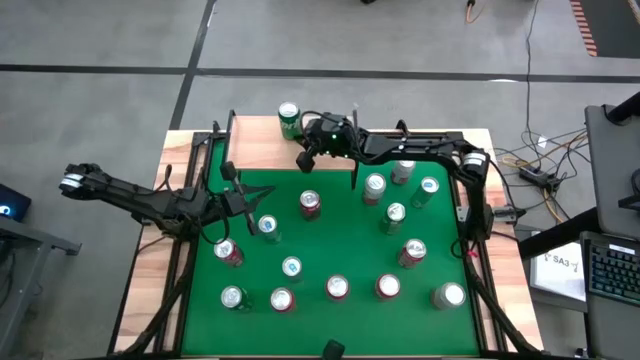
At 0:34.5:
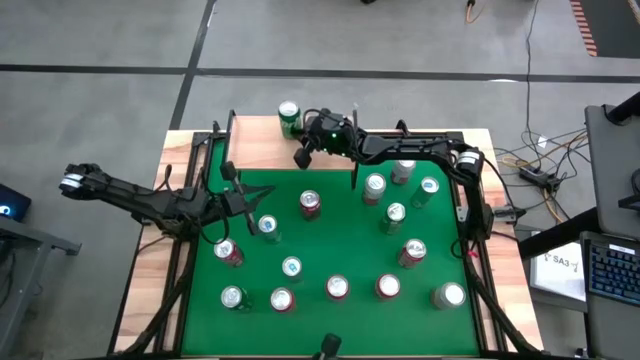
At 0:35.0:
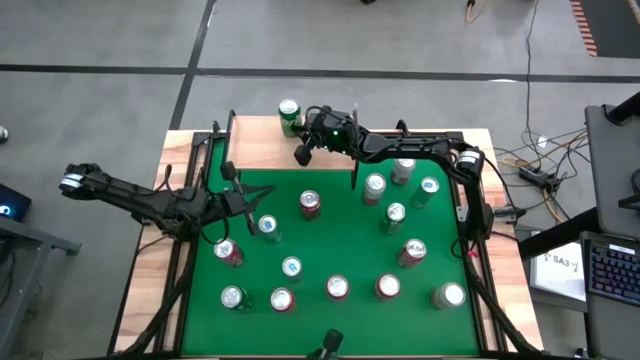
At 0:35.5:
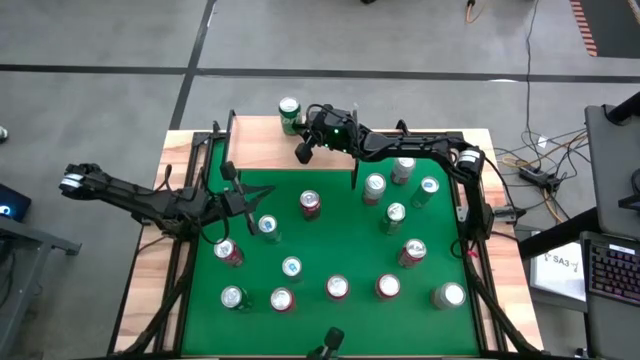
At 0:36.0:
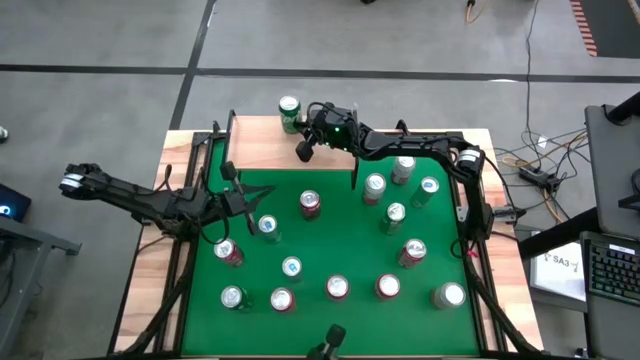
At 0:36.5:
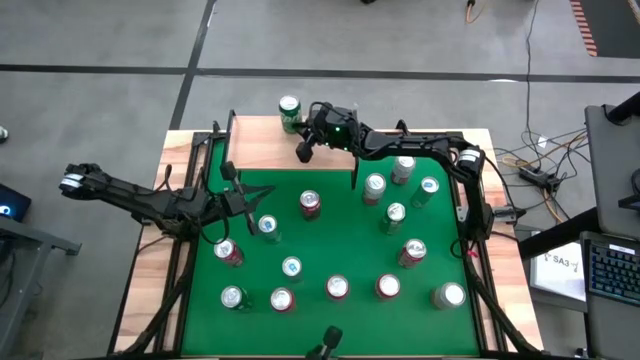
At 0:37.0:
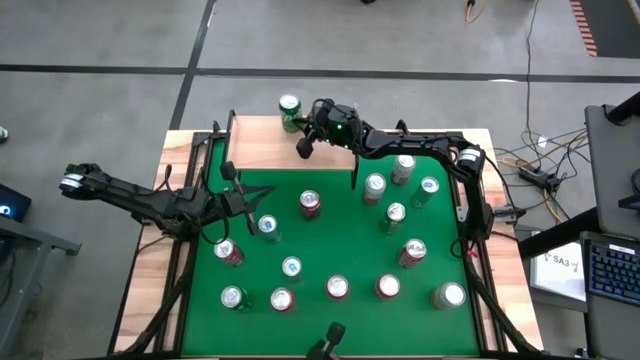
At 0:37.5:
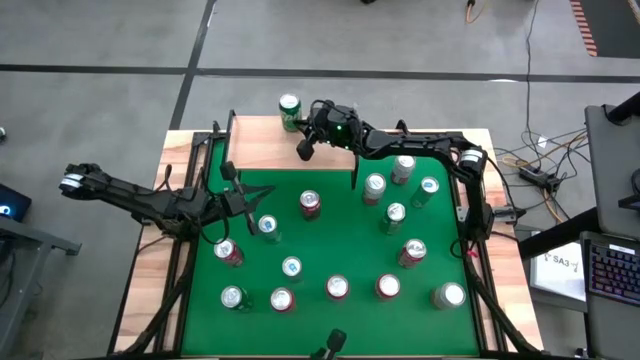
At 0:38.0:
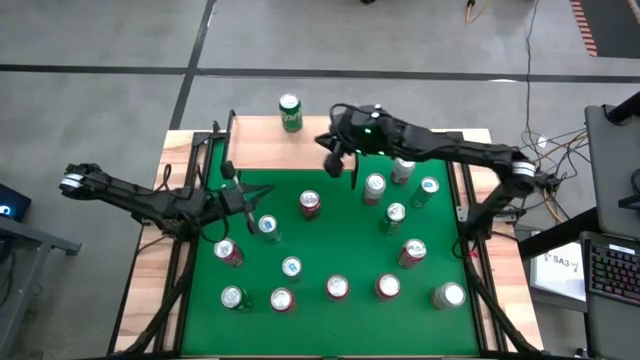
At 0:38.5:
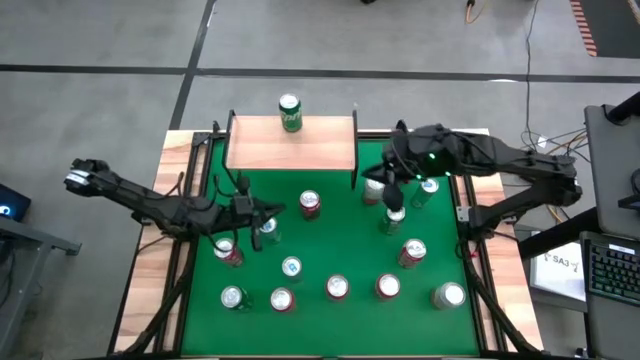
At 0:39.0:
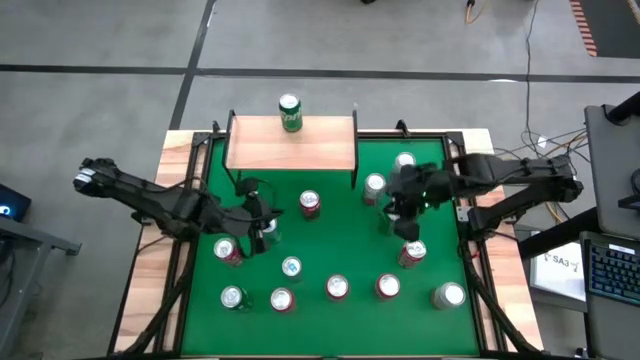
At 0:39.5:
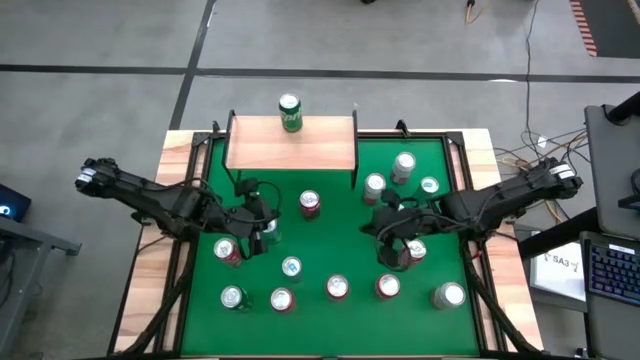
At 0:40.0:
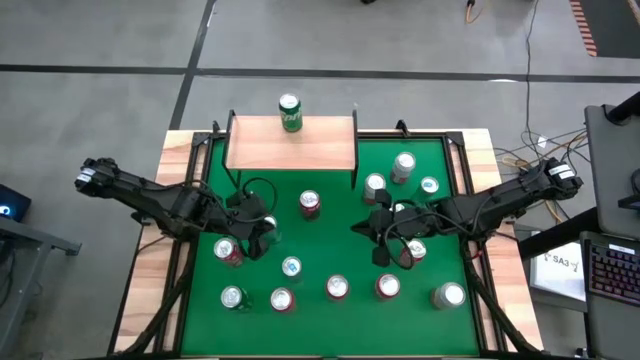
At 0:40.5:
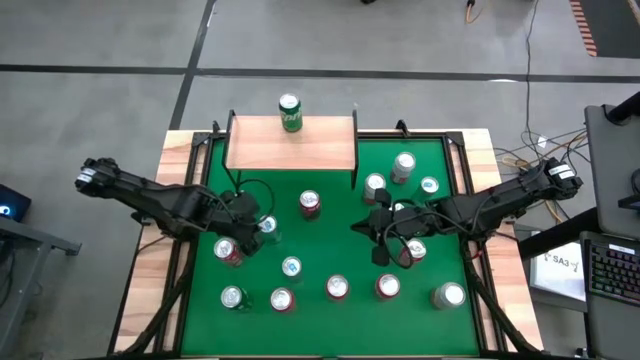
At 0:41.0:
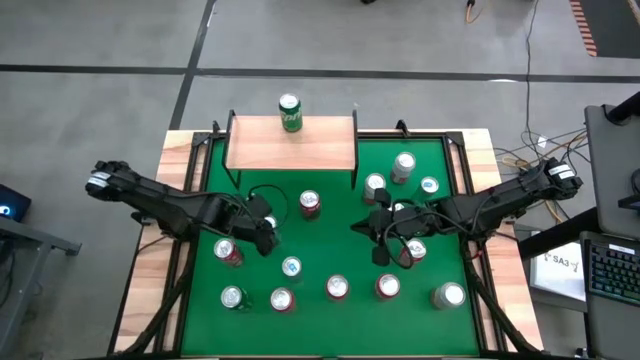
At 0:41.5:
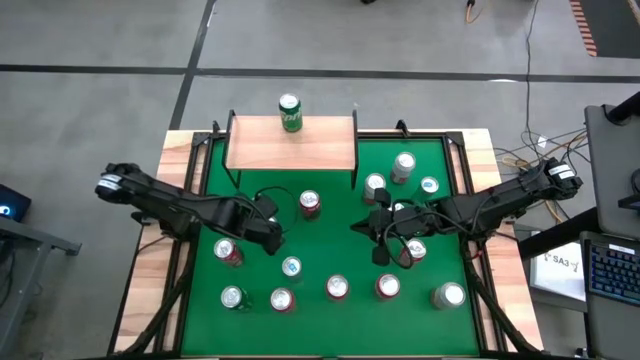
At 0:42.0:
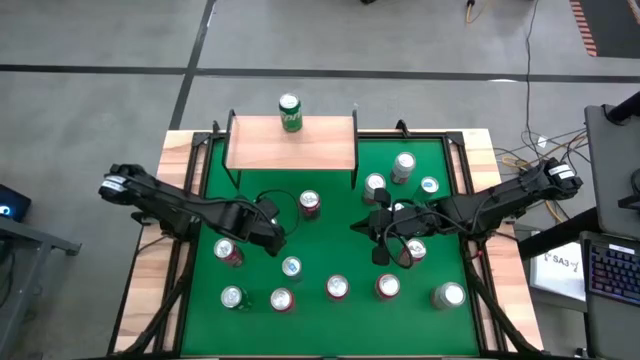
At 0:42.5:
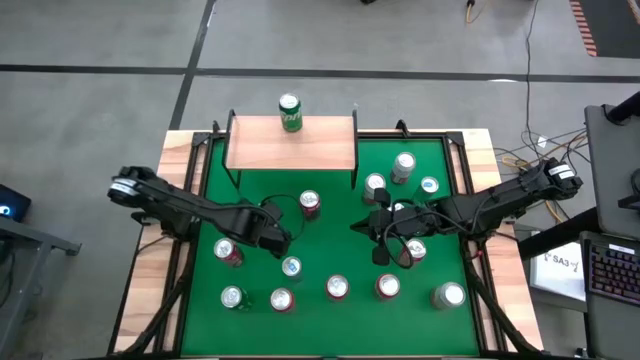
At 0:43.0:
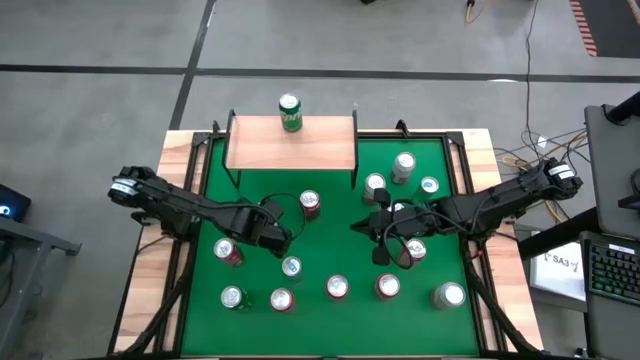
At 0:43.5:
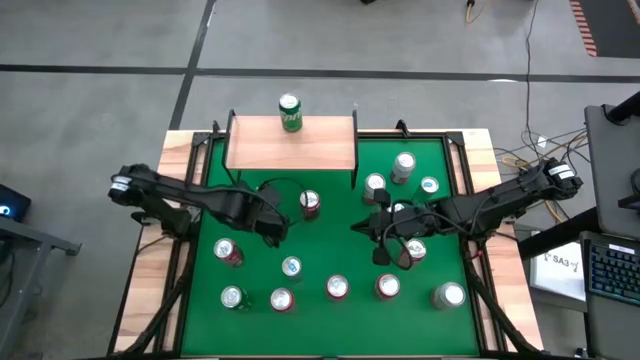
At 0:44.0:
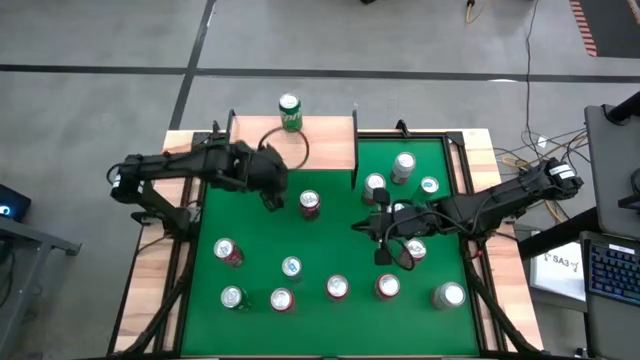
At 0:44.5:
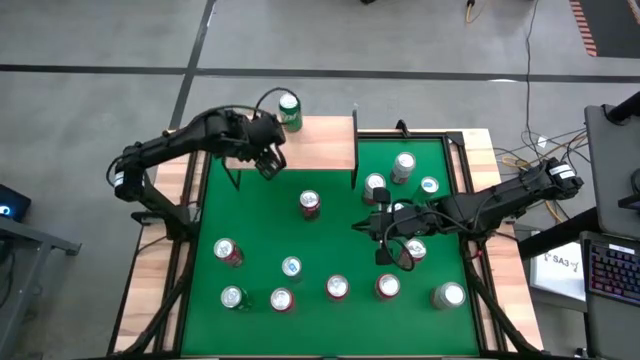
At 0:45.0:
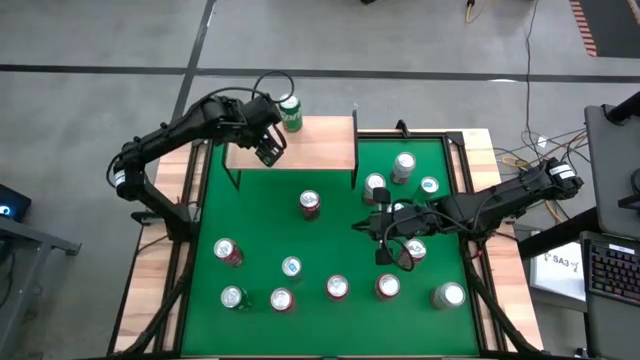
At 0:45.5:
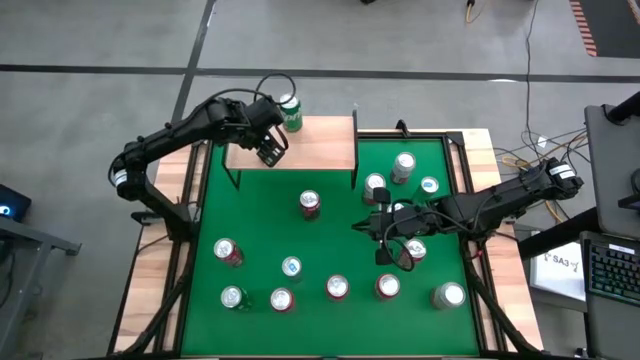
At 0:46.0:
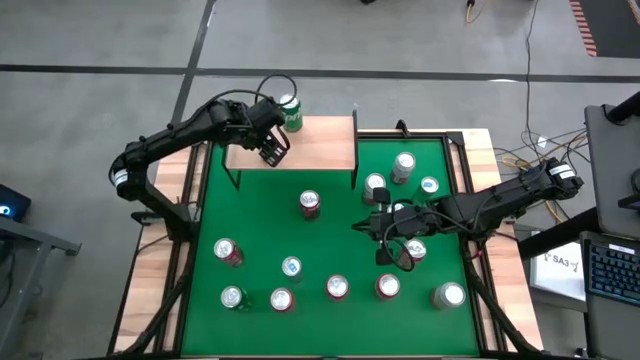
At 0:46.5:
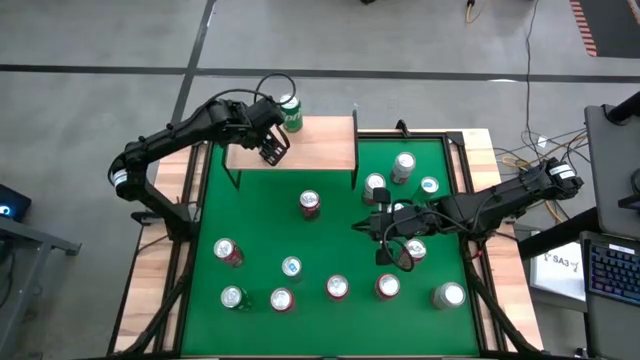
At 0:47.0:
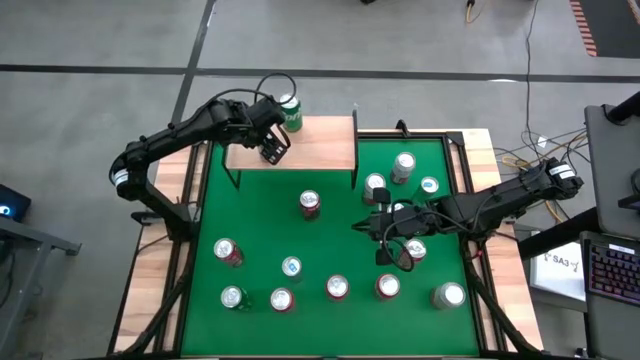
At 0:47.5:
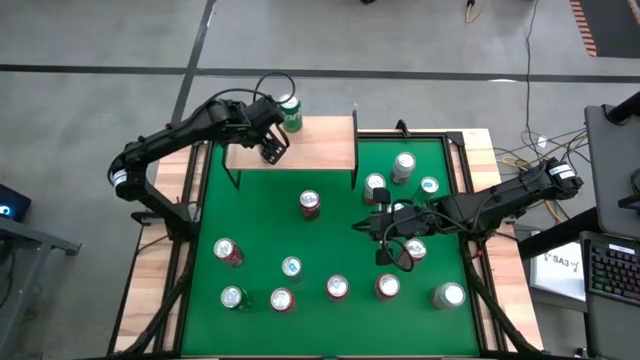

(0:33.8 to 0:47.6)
Task: Place canned beverage on shelf
Put the blue can on the shelf
